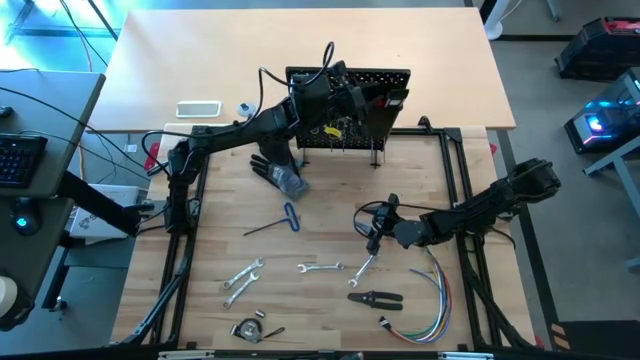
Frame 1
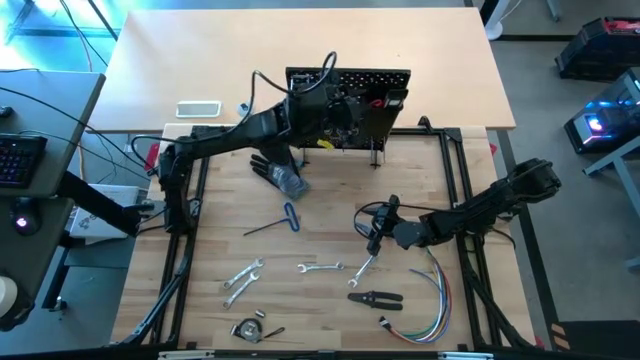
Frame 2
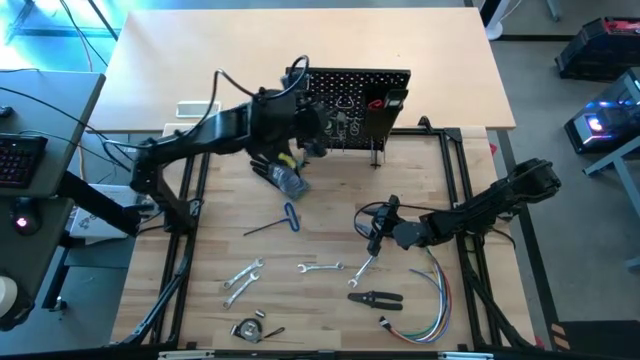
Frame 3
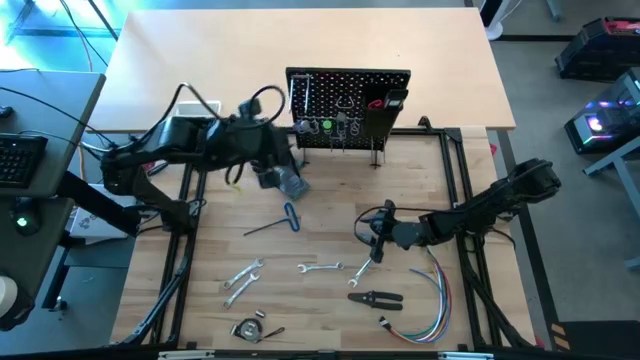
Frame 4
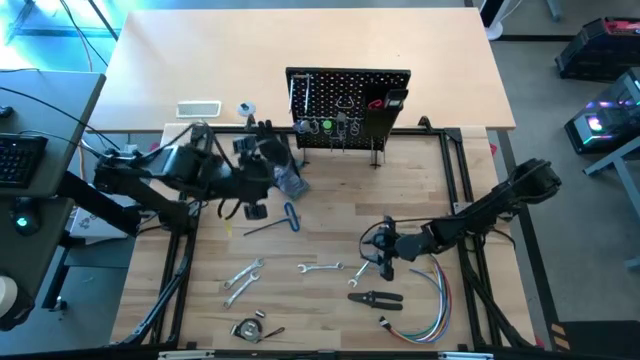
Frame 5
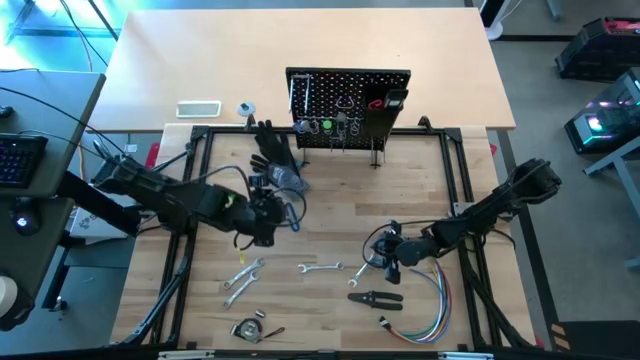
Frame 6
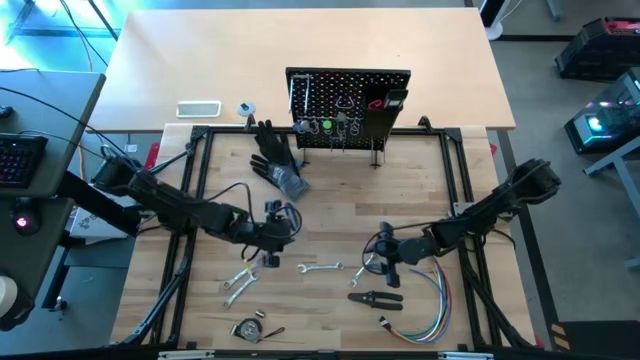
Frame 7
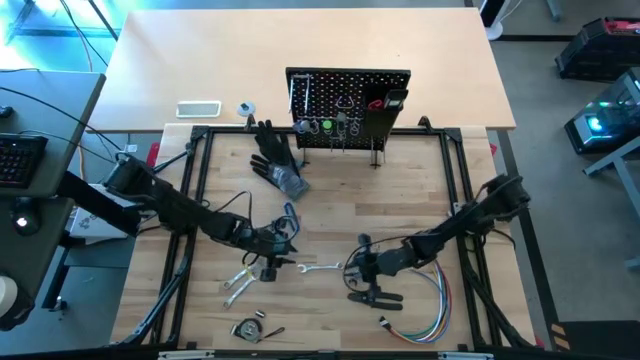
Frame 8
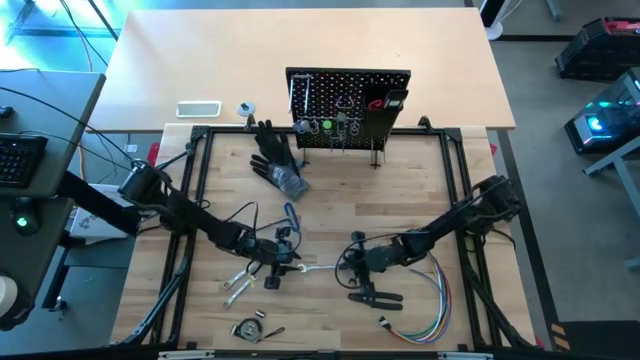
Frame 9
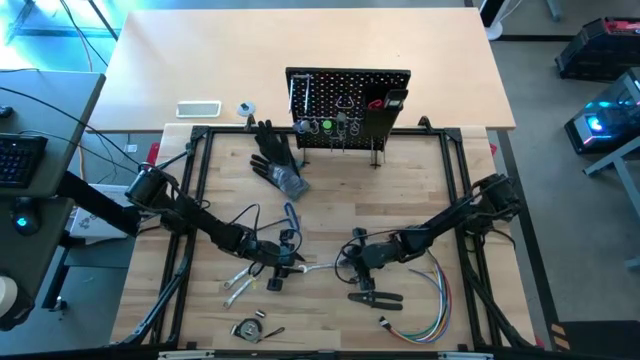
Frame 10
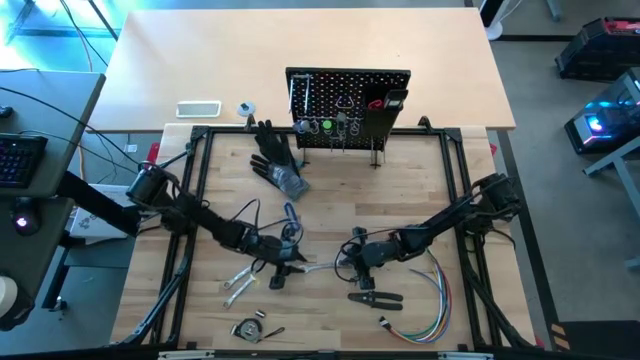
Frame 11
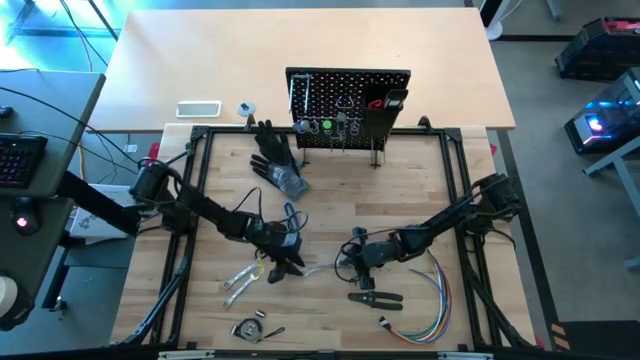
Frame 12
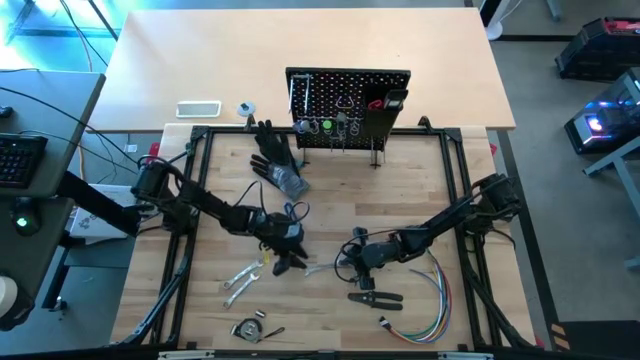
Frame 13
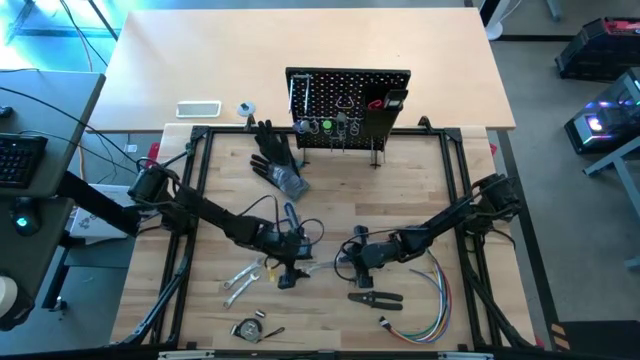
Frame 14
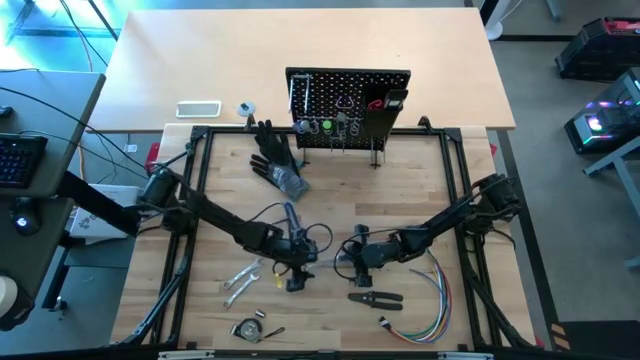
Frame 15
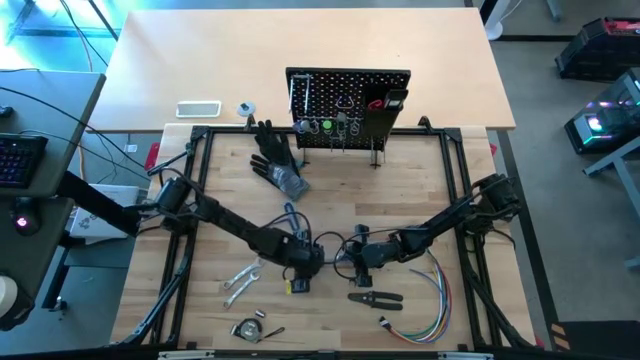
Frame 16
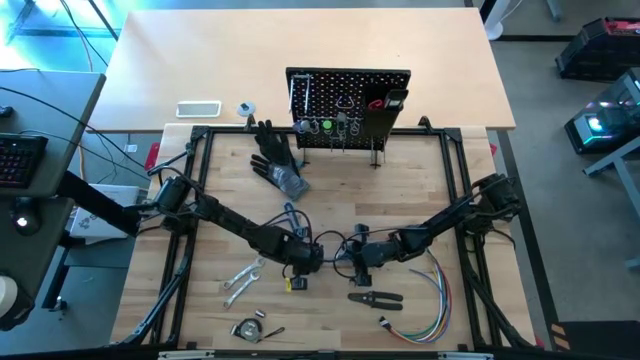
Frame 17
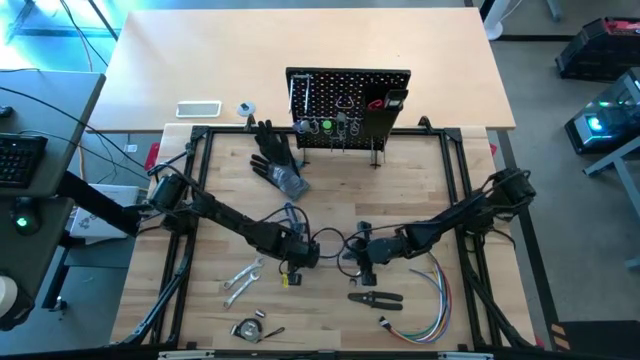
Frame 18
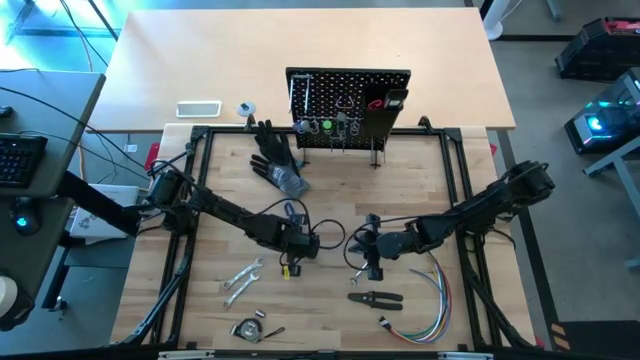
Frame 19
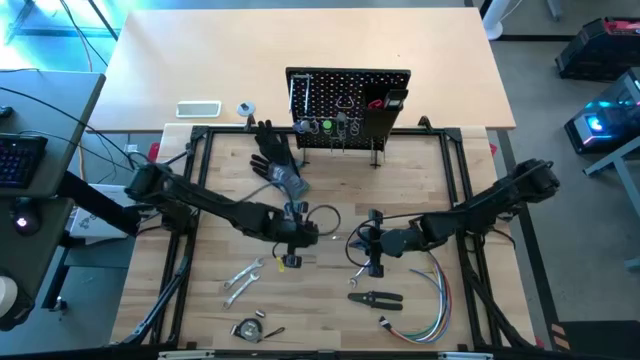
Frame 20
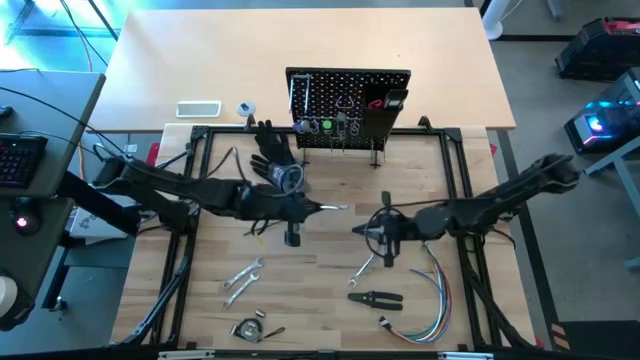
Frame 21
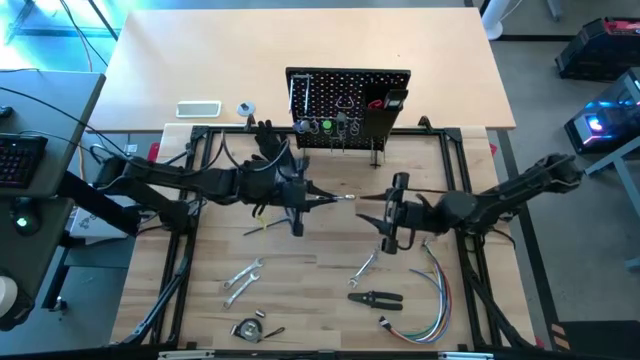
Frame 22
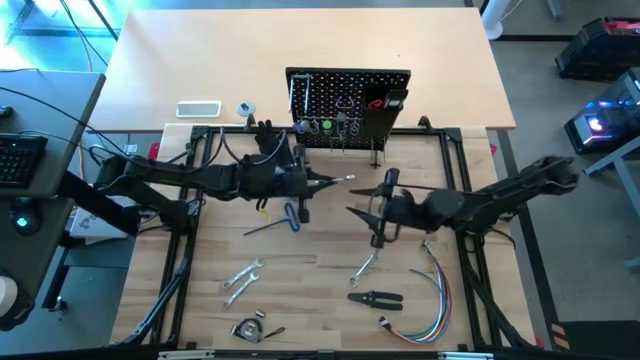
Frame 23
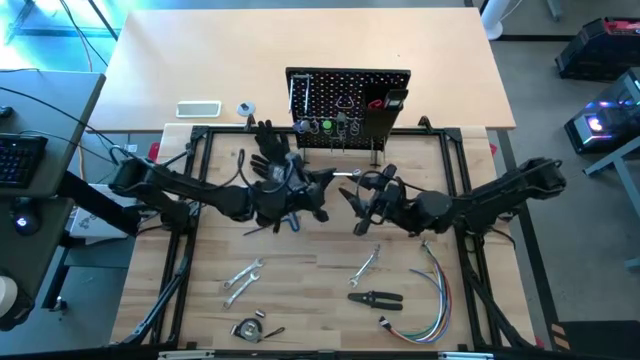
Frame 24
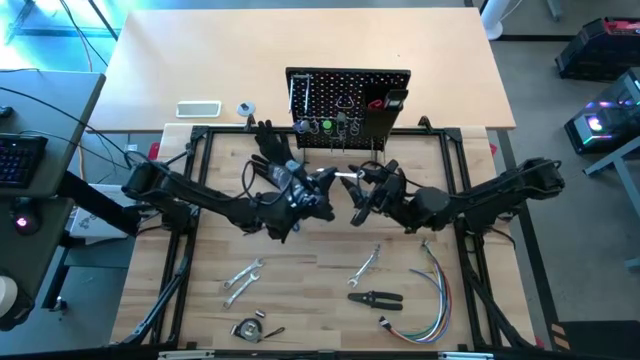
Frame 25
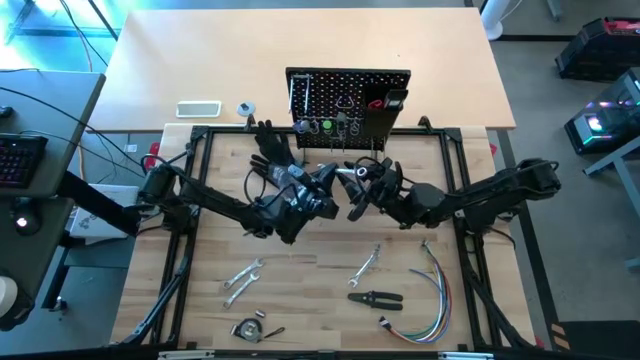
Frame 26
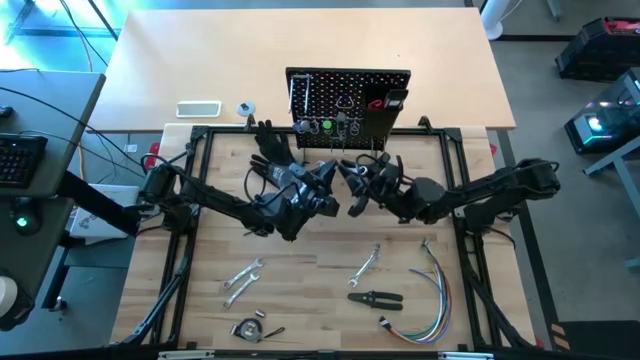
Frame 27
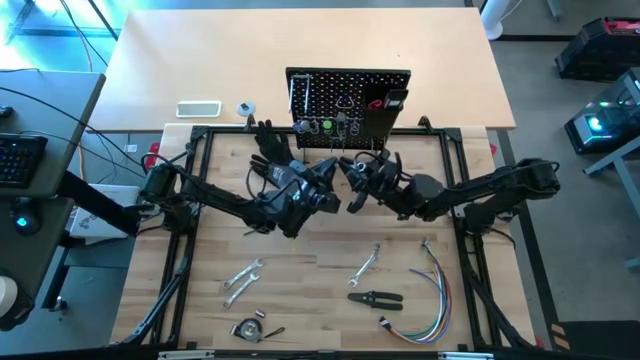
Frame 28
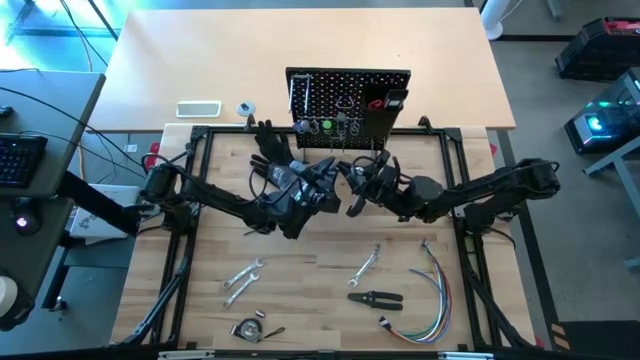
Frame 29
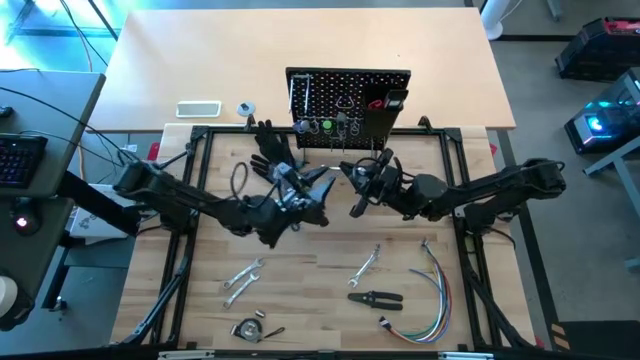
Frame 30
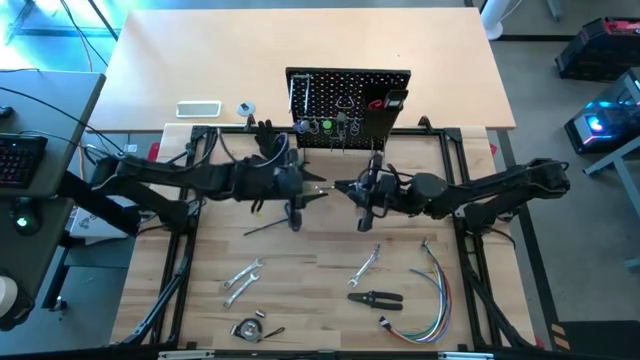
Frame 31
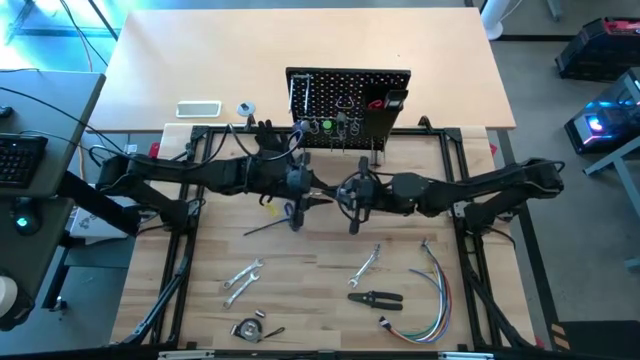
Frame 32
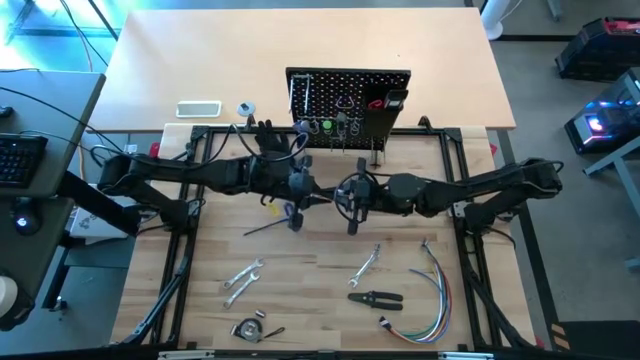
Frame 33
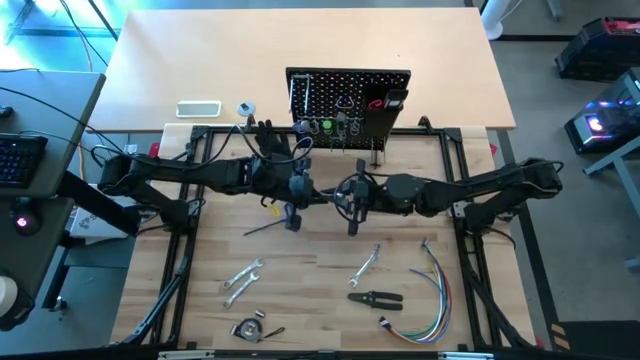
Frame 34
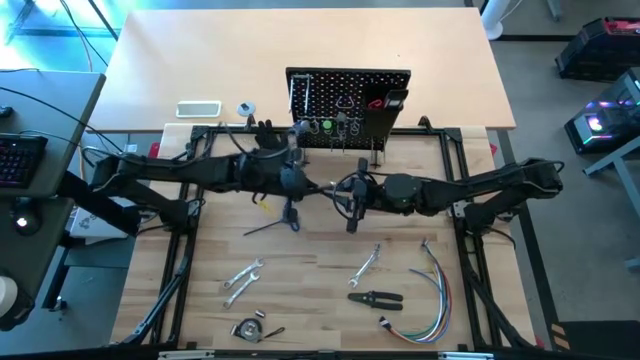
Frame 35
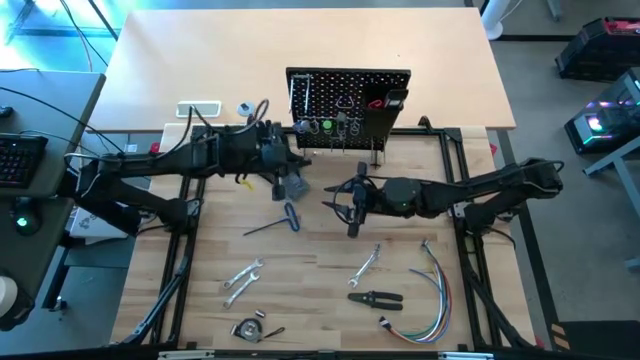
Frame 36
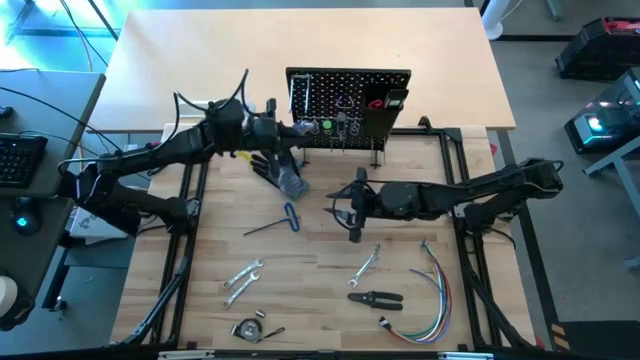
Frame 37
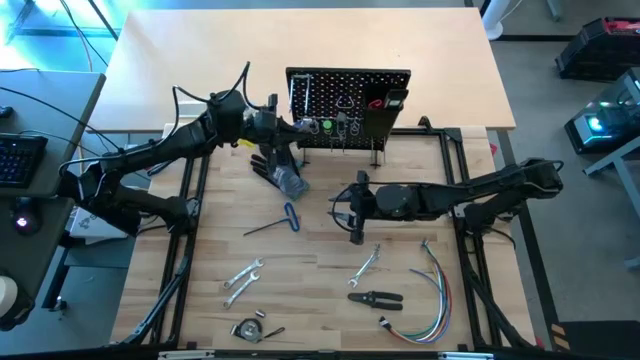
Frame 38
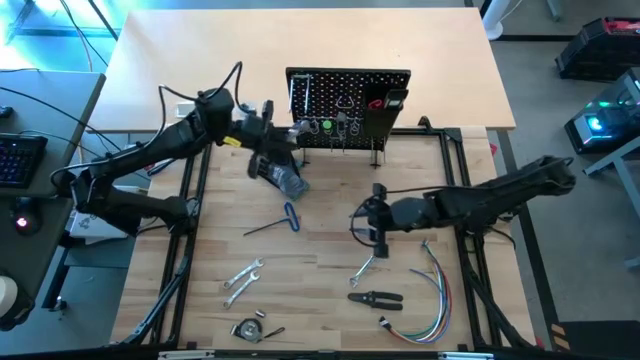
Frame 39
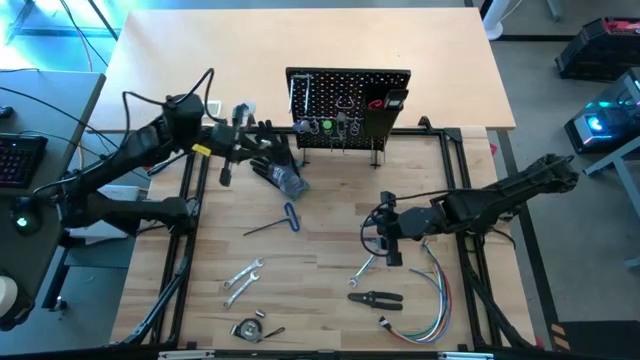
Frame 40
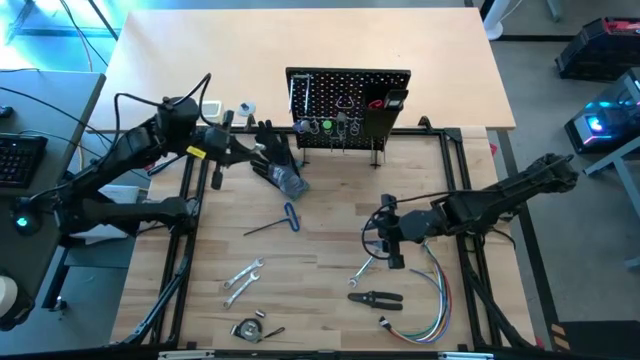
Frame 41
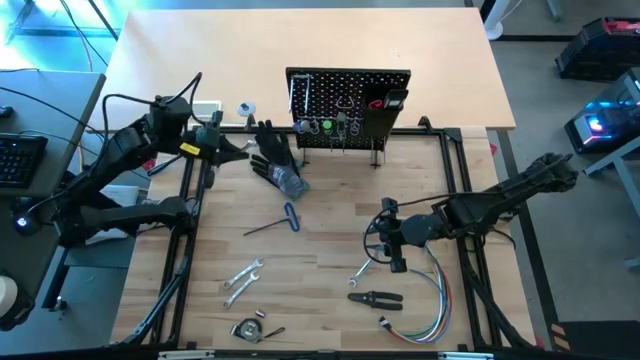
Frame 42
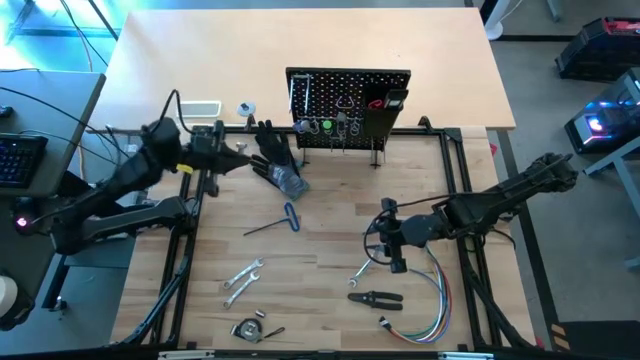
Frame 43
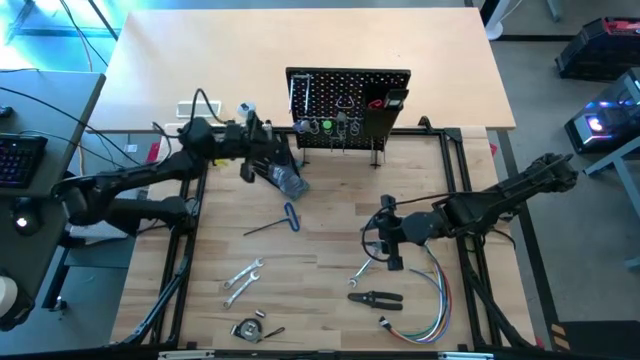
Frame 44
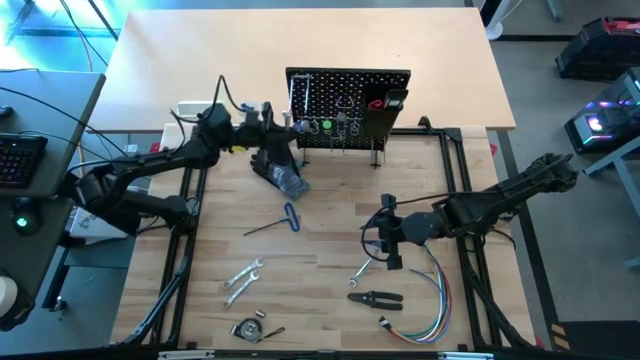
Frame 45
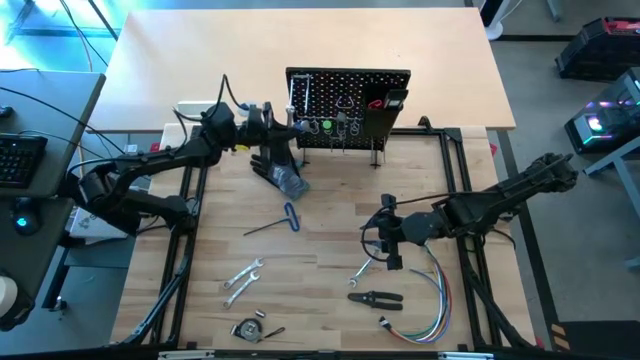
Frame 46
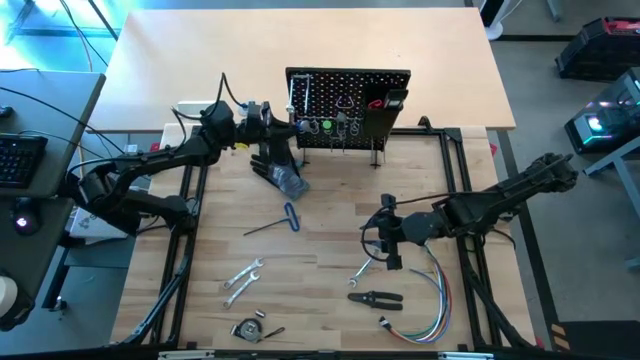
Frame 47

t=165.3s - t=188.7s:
Task: Hang tools onto peg board
Hang the silver wrench on the pegboard
